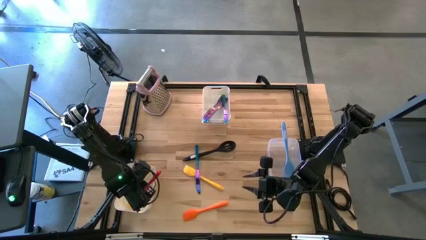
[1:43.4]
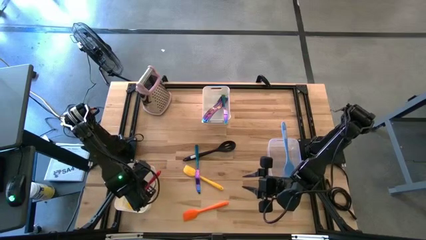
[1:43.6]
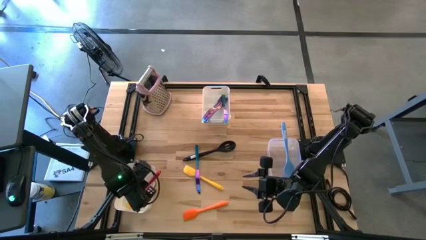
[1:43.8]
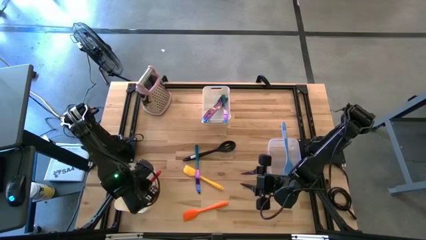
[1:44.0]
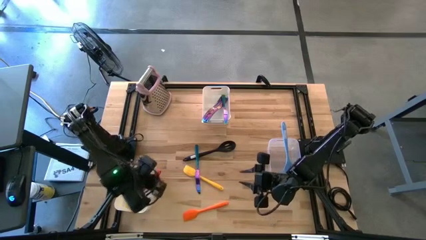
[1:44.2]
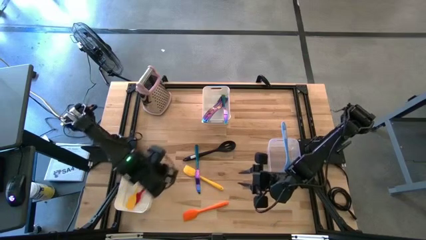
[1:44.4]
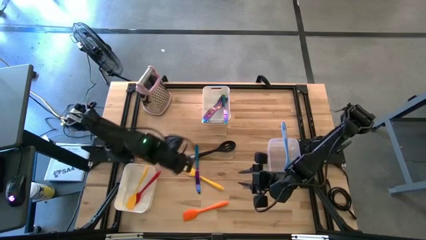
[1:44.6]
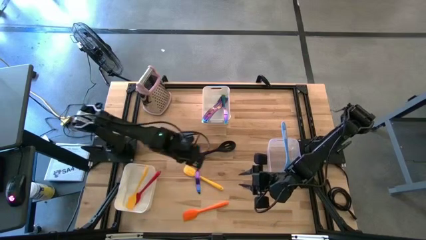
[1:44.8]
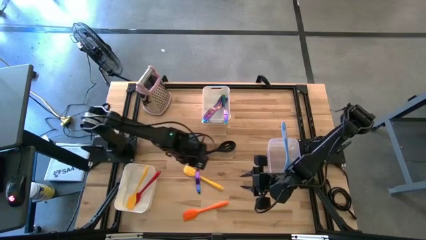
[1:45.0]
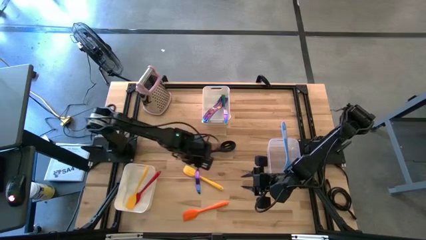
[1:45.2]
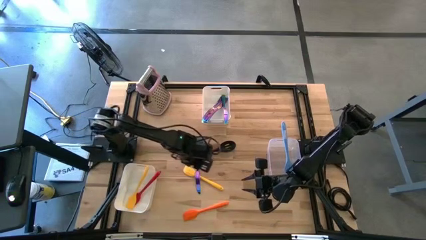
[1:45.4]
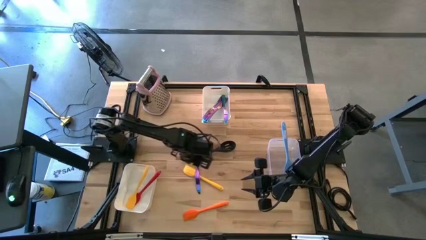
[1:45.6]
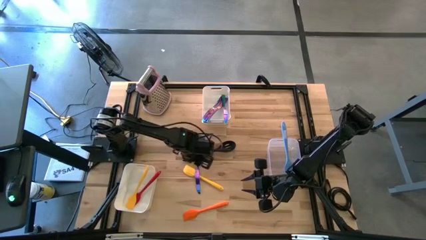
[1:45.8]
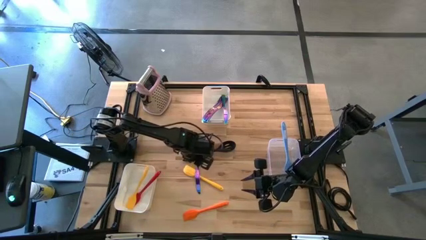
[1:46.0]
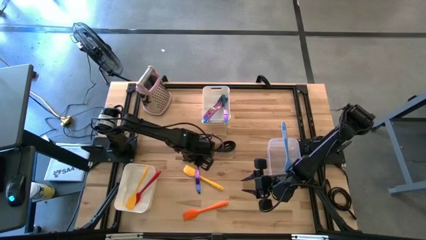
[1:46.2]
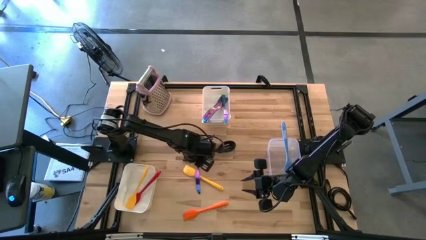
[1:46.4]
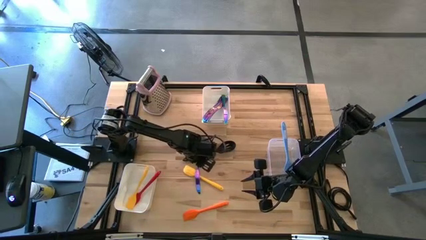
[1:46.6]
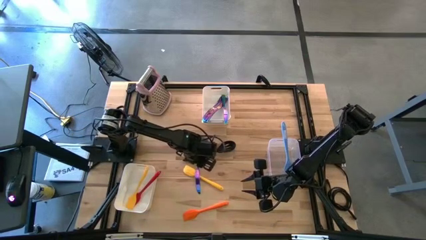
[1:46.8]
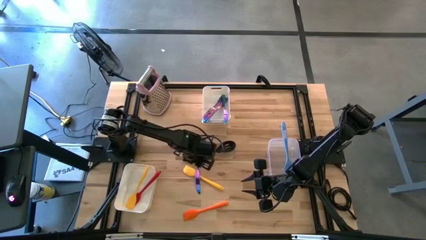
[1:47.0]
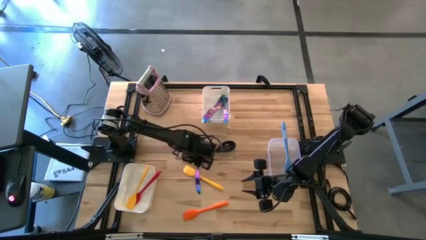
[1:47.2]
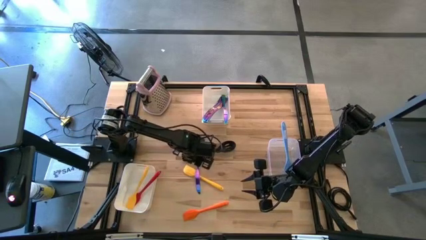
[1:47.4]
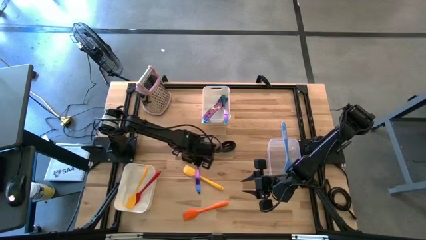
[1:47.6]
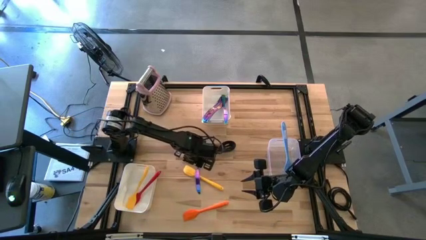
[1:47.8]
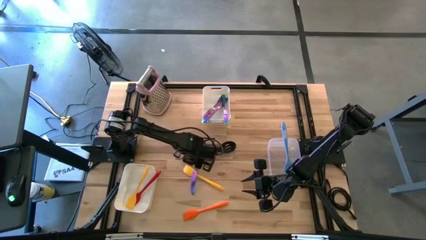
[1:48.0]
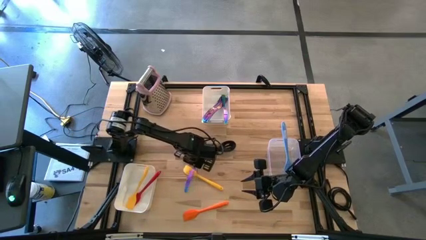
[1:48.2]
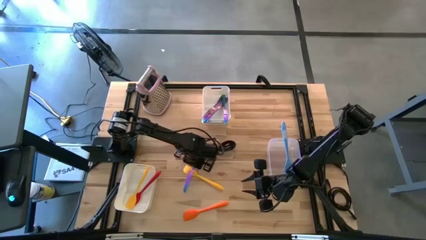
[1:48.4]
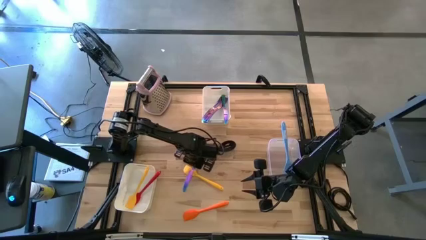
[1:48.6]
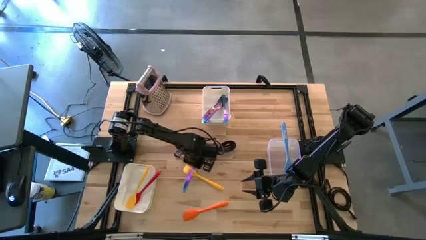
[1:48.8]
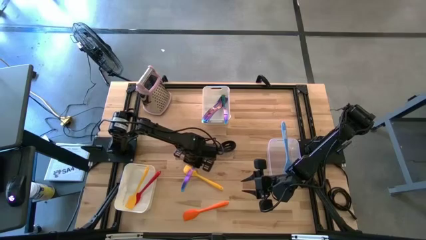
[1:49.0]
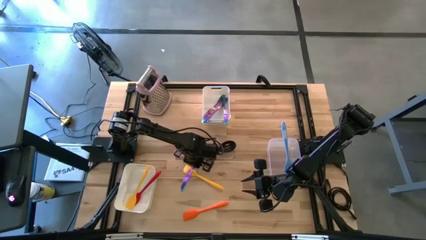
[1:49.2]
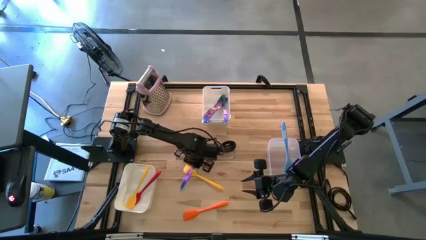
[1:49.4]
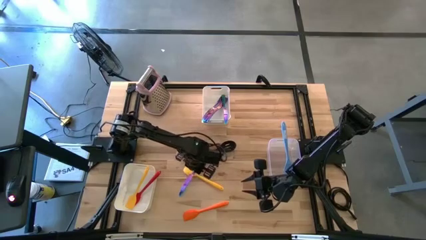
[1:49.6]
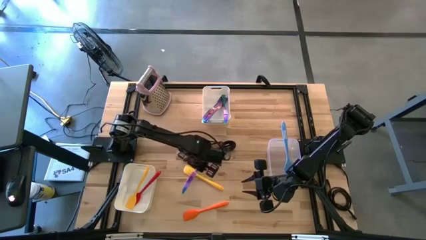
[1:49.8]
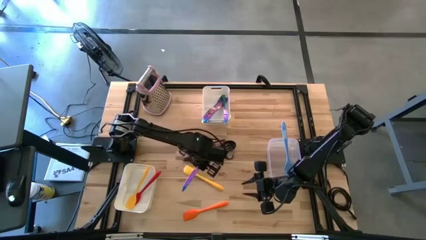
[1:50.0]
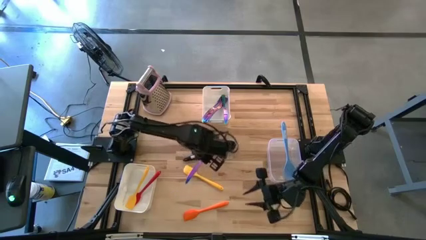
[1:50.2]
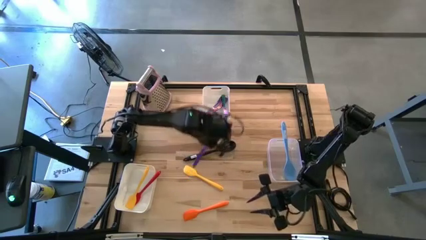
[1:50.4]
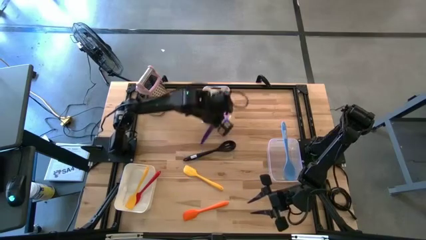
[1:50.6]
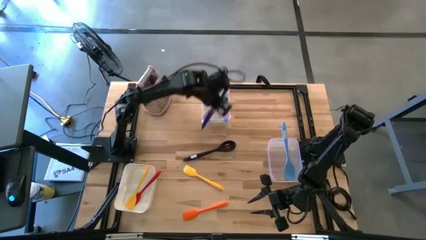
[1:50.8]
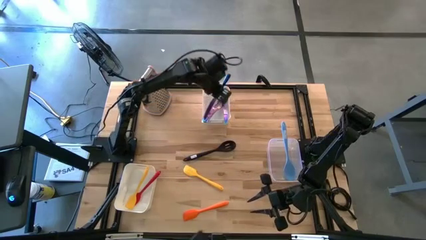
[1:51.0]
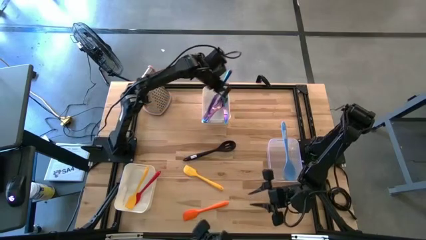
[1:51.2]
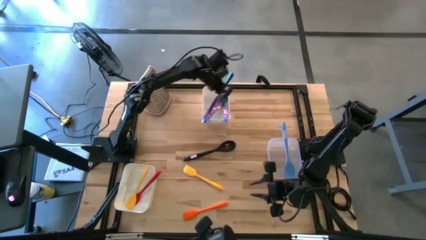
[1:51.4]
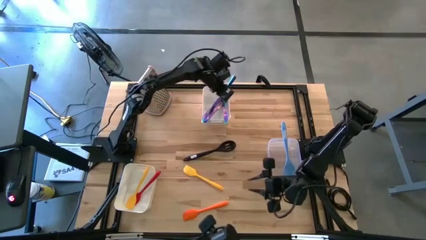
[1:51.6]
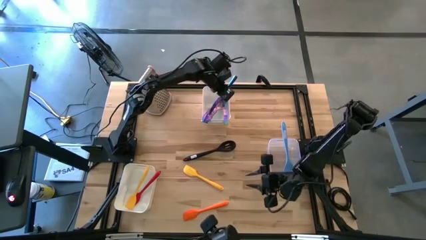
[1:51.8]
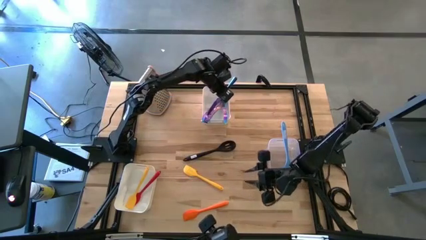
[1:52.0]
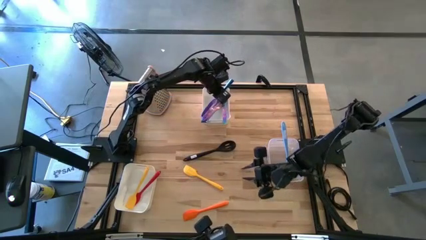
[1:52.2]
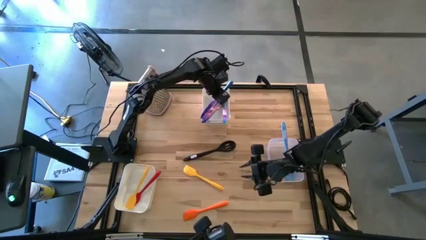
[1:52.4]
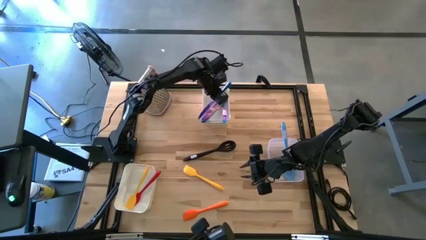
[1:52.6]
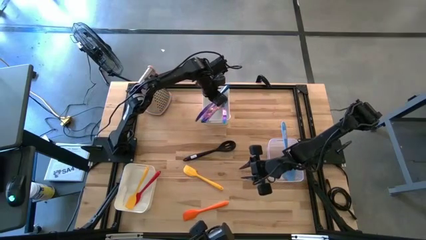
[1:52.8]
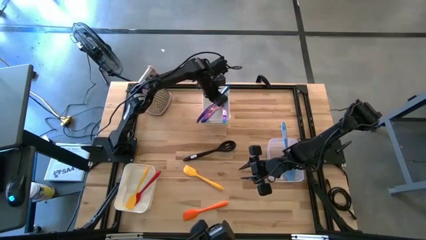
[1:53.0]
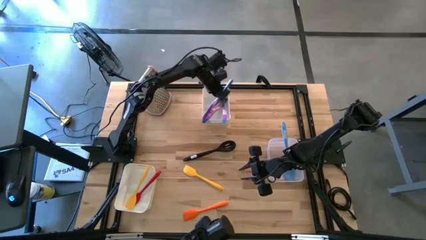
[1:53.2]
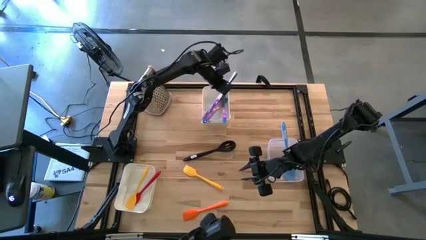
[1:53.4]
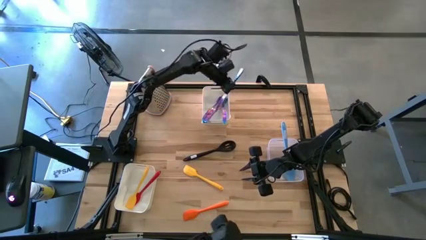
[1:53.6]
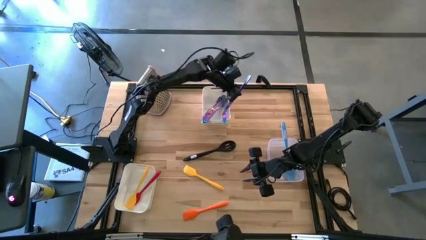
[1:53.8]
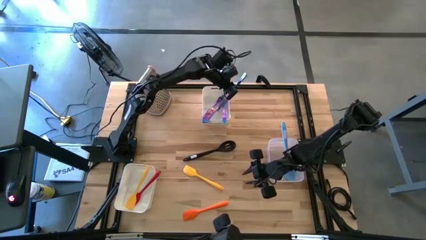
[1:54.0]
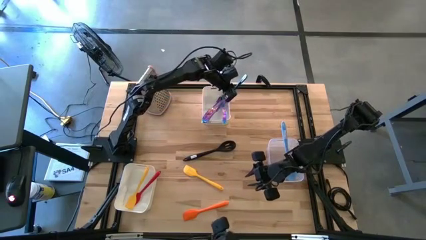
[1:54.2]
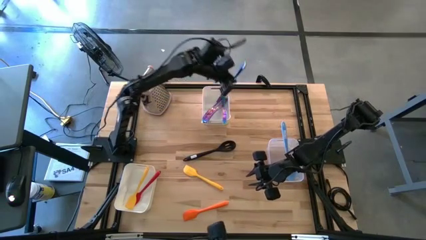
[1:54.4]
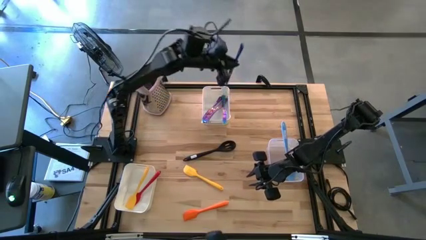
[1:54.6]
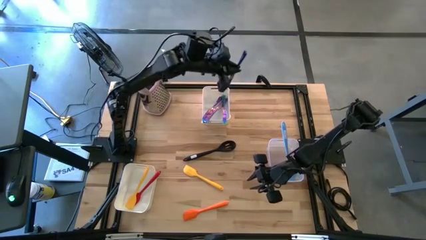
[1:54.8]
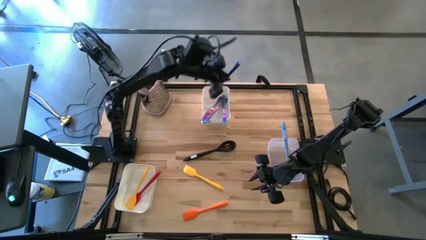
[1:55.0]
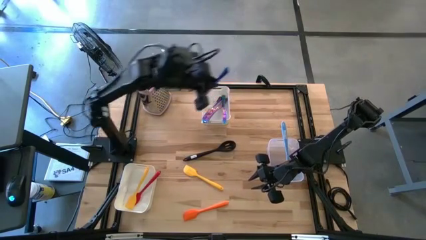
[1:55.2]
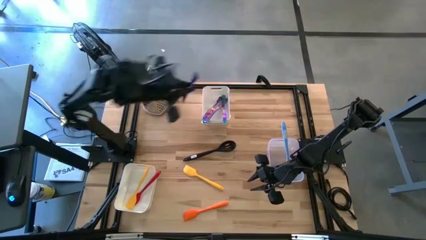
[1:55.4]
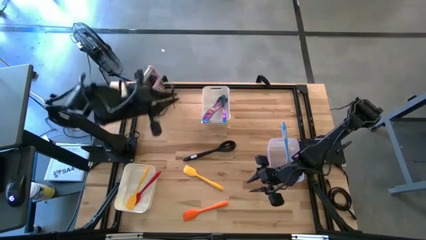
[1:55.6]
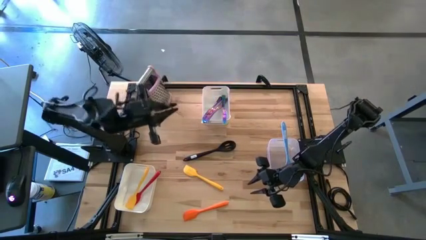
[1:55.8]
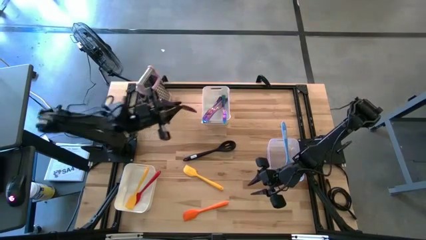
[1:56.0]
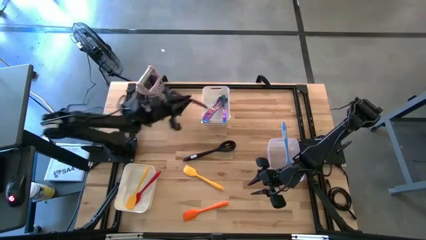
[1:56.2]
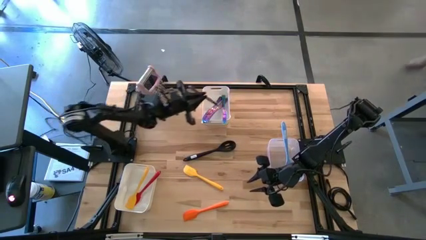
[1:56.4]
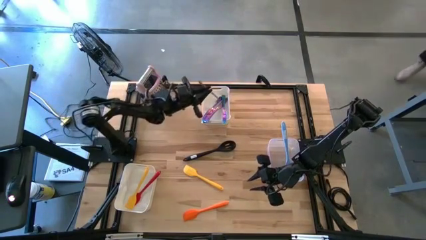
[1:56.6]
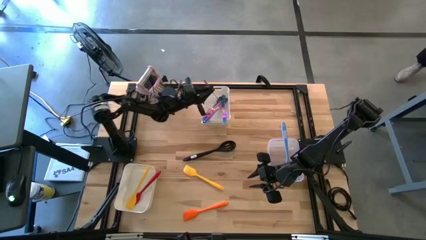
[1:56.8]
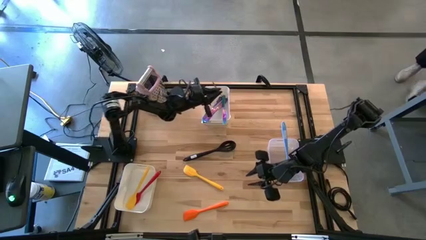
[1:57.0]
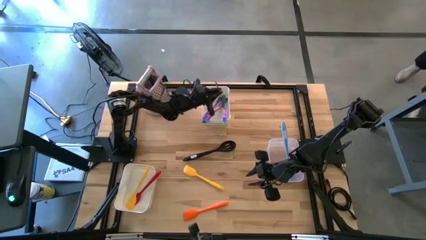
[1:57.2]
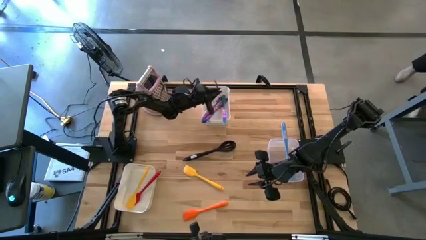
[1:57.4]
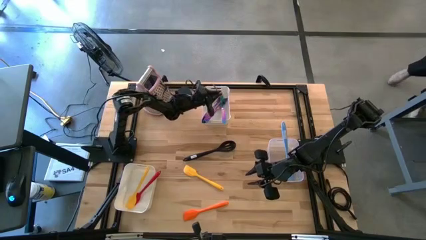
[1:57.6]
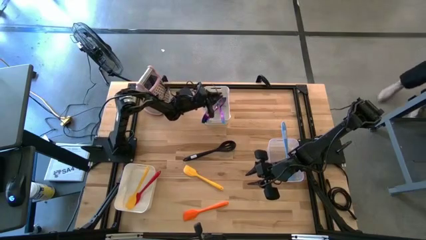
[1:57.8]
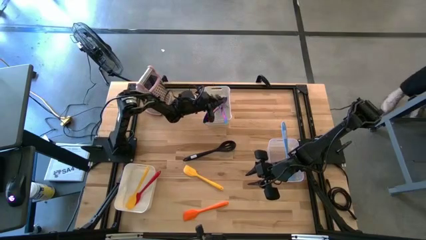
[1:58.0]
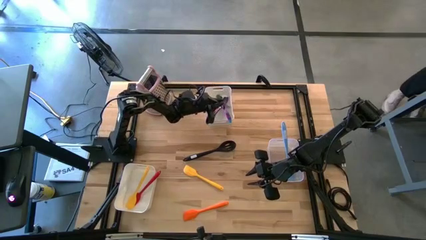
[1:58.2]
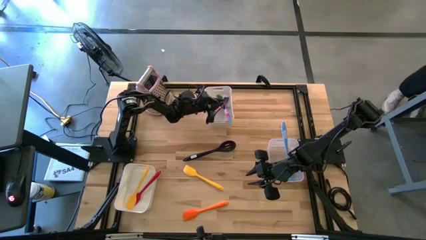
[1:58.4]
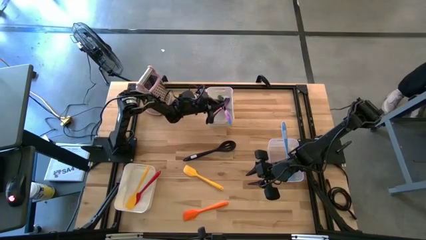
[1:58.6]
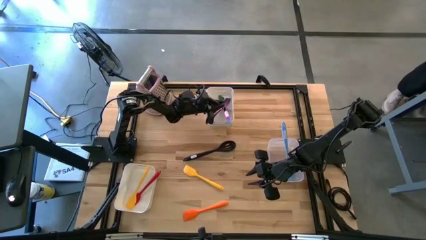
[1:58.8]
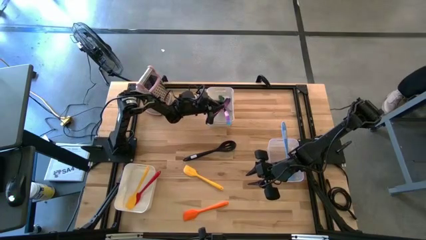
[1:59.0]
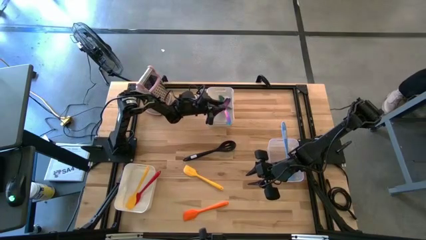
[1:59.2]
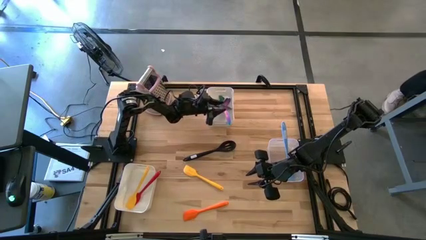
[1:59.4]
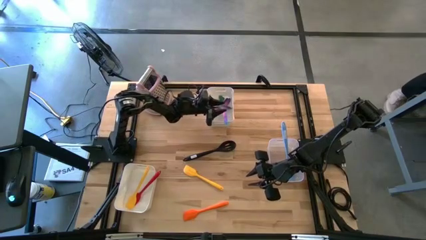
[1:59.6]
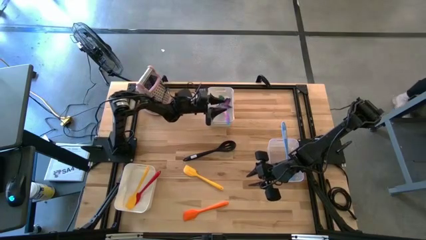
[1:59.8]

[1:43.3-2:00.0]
Task: Pick & Place Kitchen Items
Put the blue table knife into the top white bin
